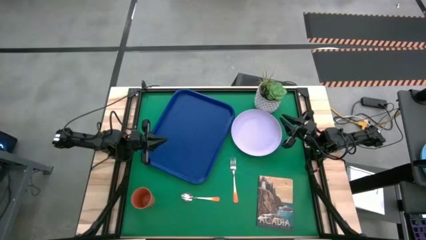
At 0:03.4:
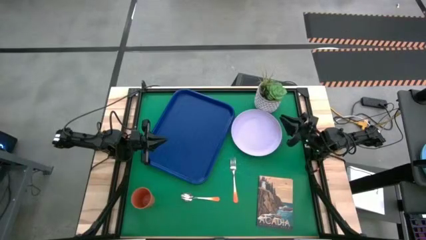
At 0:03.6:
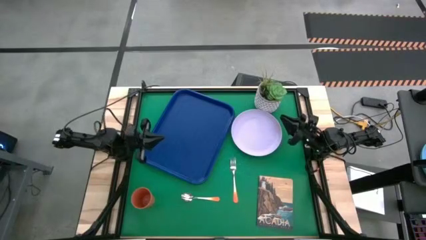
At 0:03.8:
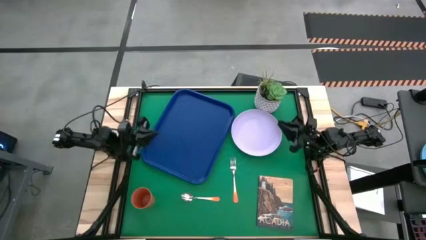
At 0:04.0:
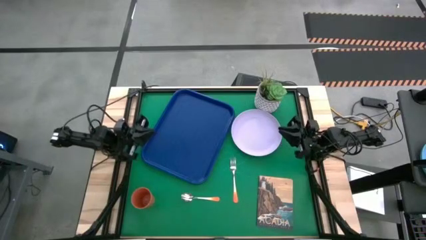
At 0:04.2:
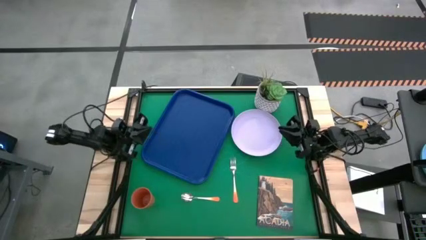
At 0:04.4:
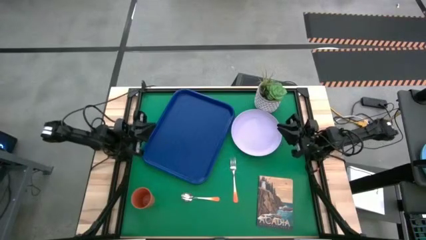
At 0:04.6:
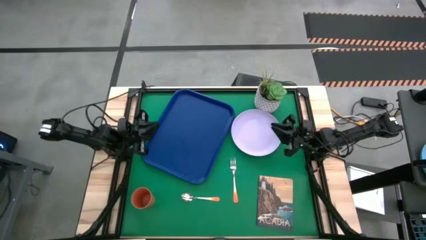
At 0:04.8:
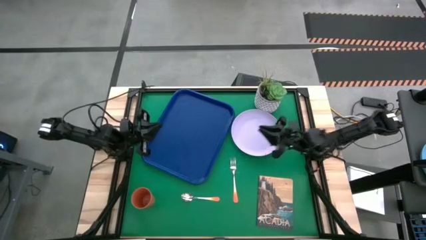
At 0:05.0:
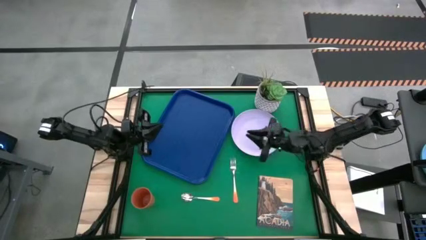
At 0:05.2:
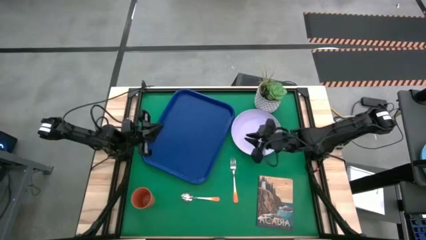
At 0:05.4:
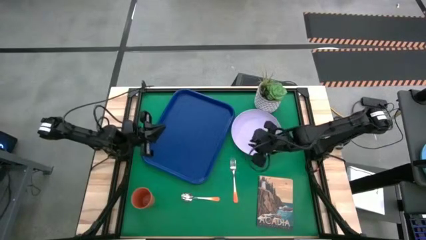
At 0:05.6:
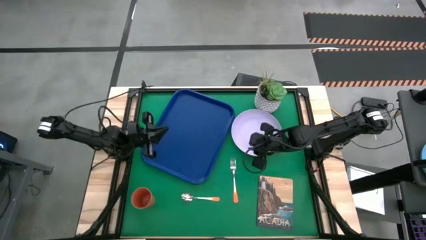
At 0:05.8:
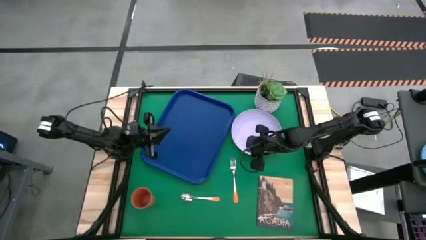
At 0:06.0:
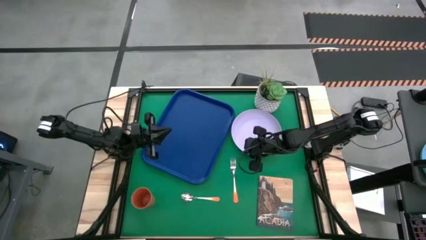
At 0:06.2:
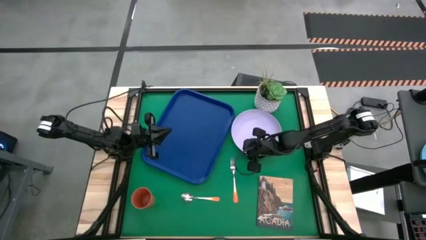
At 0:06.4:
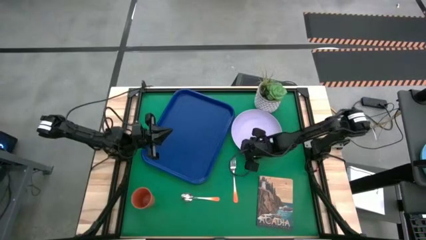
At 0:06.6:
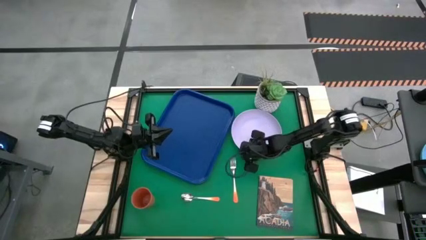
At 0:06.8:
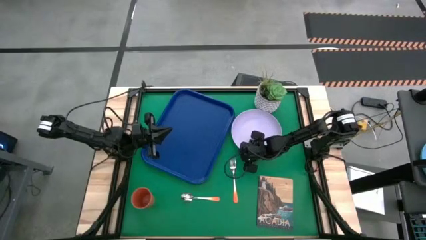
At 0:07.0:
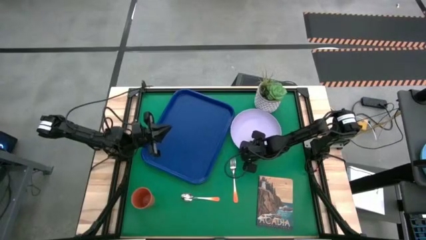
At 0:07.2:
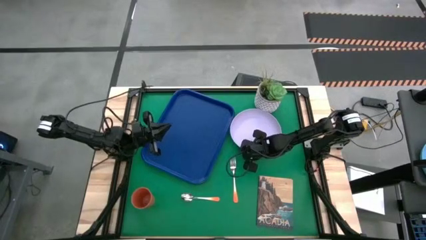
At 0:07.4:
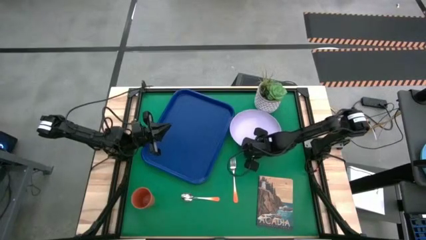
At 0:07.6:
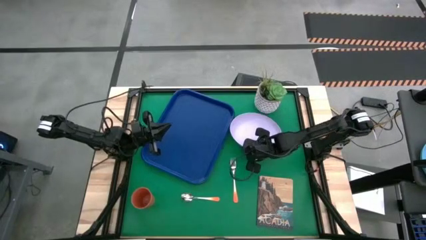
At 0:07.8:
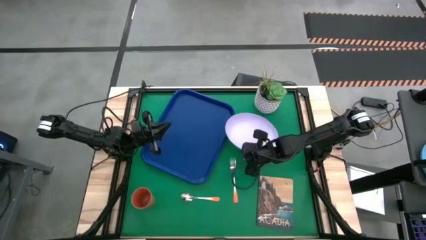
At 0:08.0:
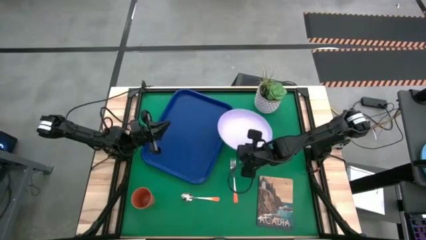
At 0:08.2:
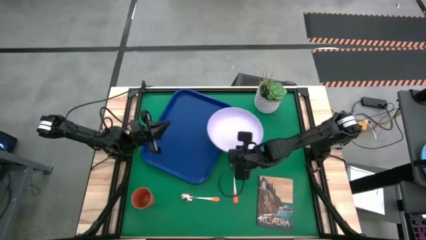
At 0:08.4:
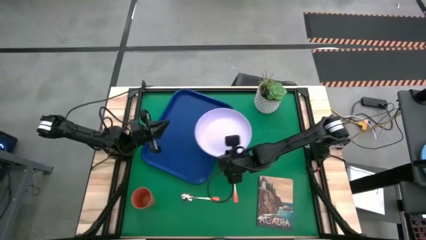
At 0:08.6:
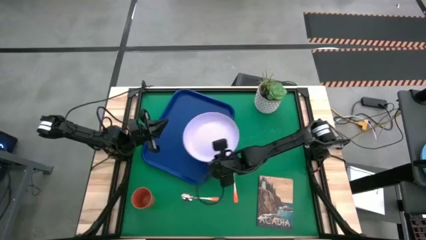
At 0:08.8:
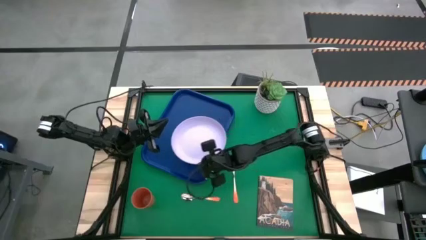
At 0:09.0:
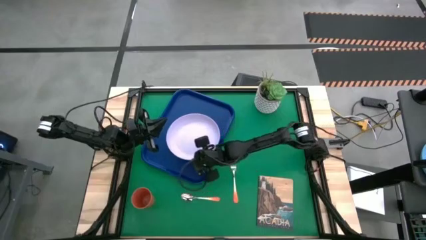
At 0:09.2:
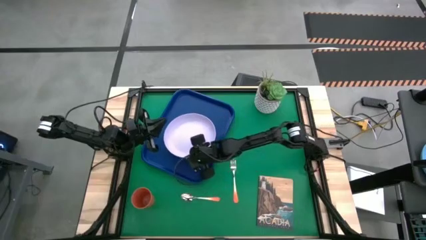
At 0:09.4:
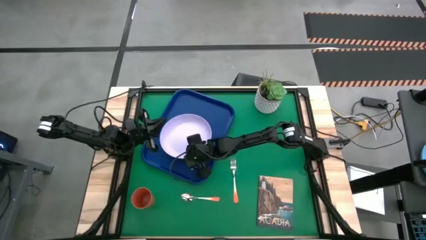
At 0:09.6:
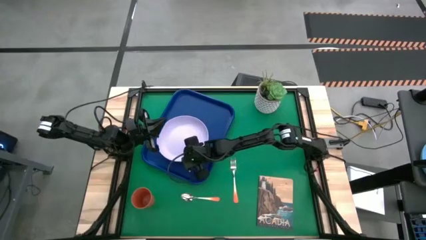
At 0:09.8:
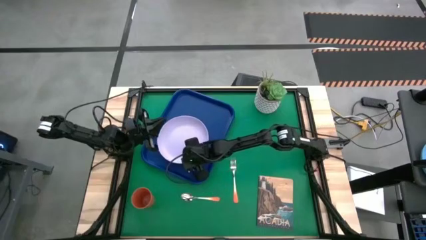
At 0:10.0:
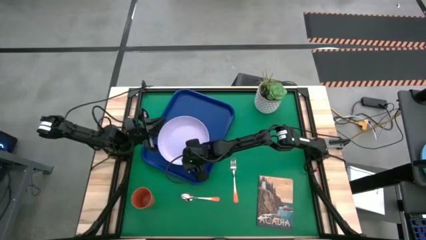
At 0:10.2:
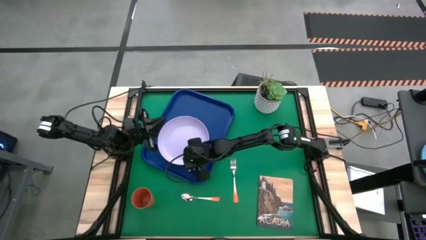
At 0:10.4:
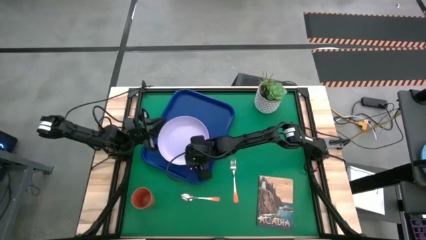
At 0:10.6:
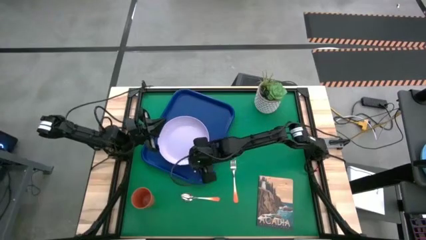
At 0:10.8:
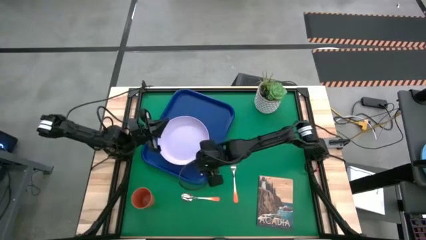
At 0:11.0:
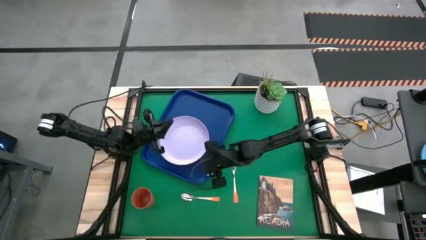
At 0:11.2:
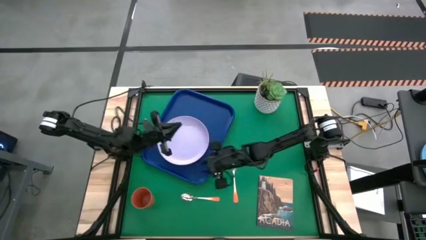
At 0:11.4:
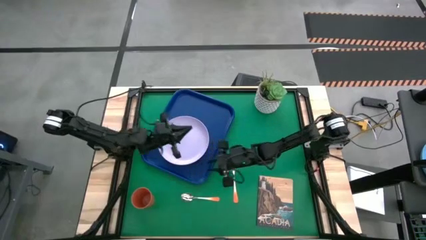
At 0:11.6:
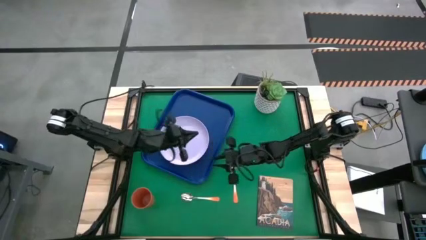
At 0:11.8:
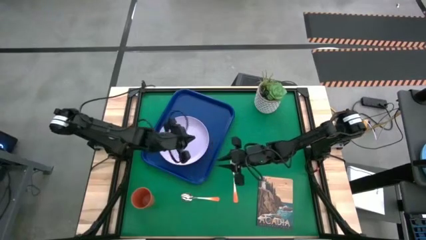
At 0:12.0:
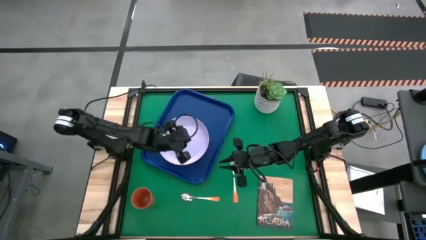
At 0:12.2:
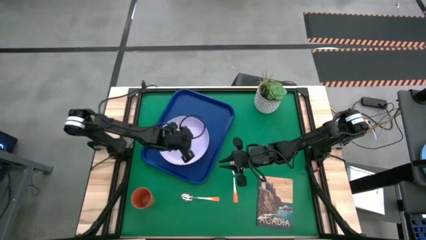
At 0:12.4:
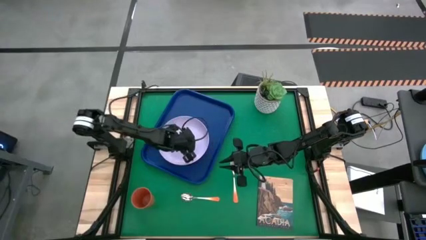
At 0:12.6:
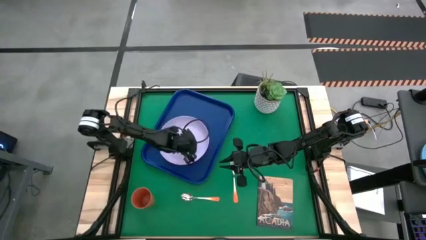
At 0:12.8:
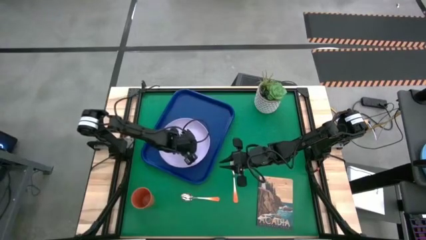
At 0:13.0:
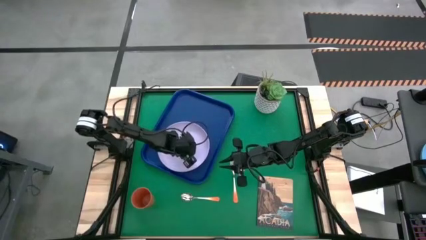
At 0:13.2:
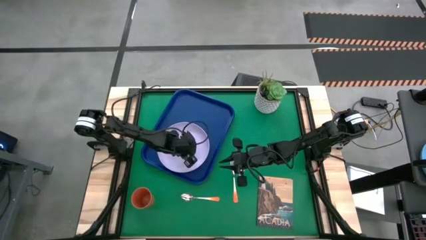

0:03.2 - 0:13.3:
Task: Pick and place plate/cup/fork/spoon on tray
Put the white plate on the blue tray
